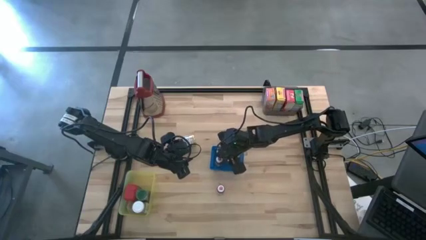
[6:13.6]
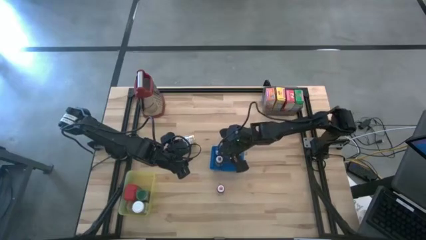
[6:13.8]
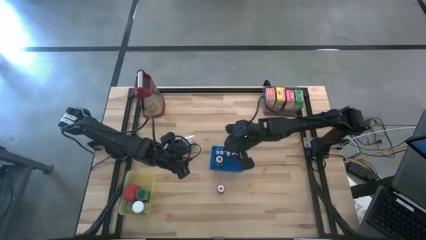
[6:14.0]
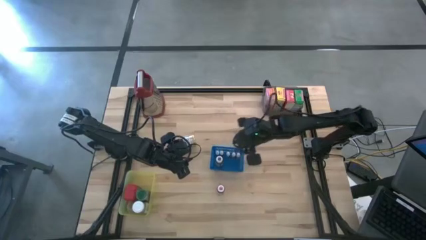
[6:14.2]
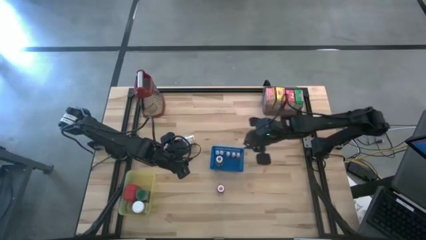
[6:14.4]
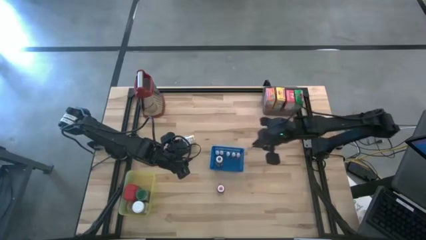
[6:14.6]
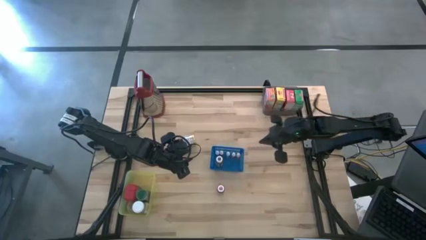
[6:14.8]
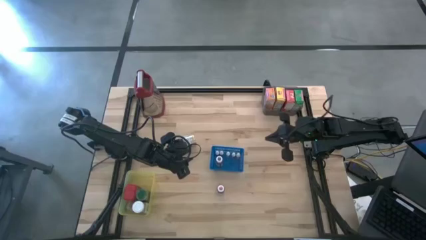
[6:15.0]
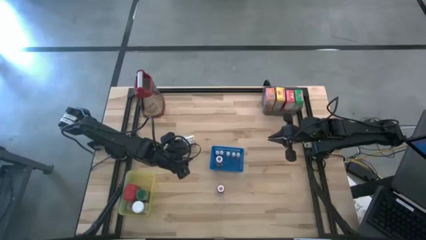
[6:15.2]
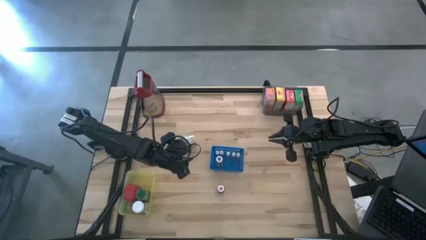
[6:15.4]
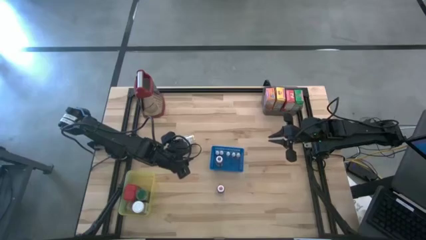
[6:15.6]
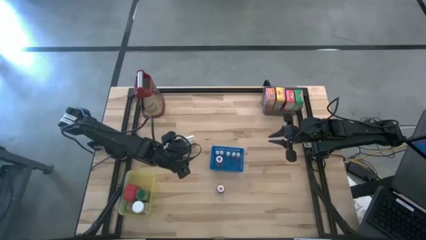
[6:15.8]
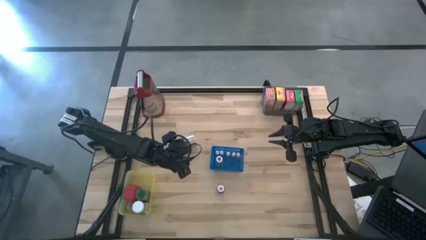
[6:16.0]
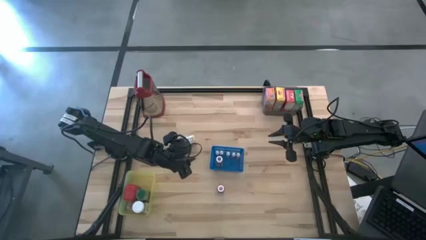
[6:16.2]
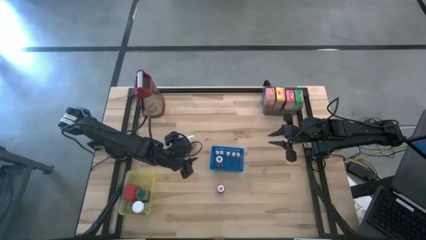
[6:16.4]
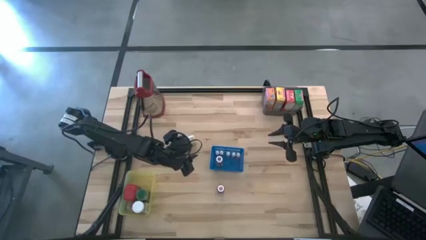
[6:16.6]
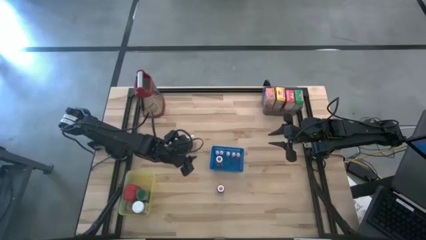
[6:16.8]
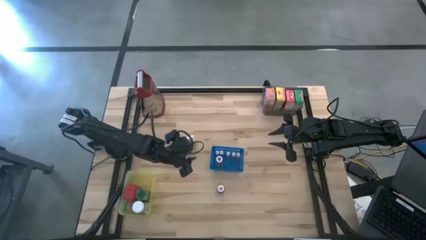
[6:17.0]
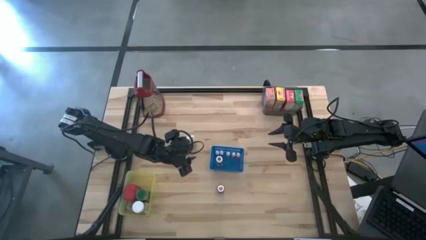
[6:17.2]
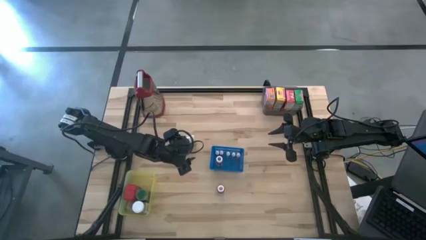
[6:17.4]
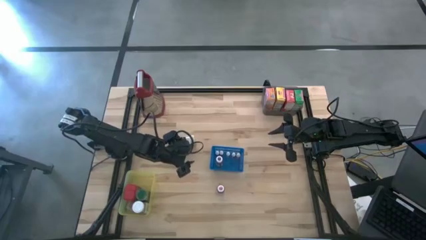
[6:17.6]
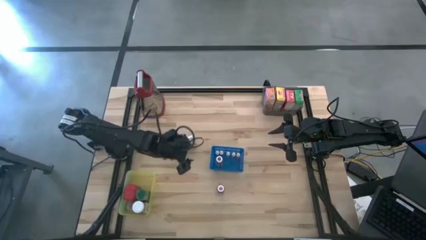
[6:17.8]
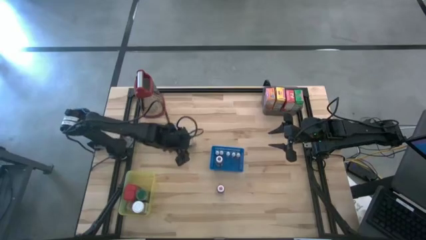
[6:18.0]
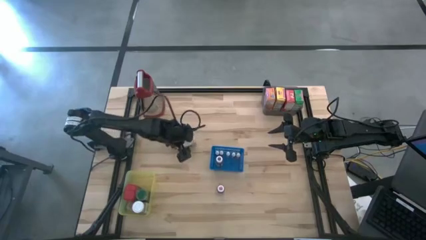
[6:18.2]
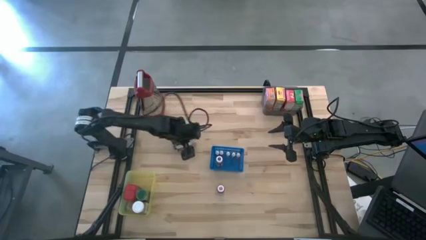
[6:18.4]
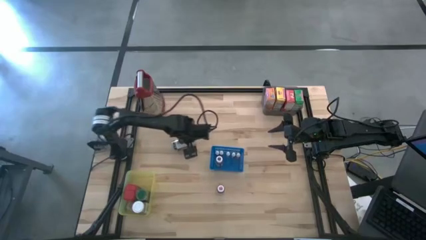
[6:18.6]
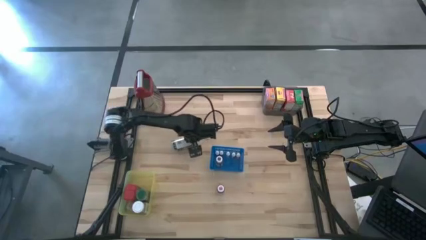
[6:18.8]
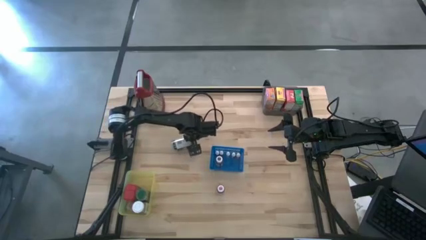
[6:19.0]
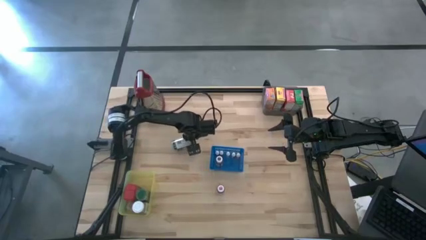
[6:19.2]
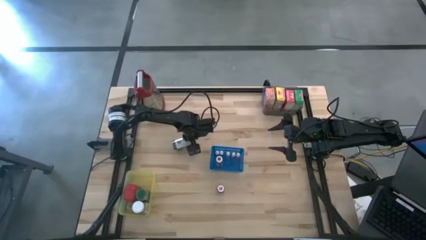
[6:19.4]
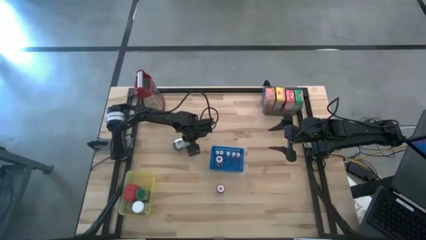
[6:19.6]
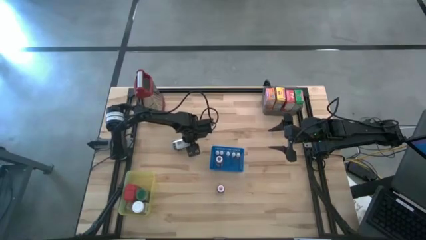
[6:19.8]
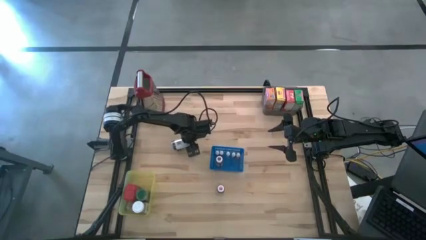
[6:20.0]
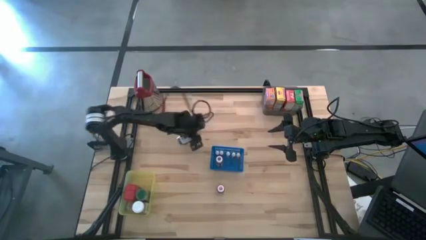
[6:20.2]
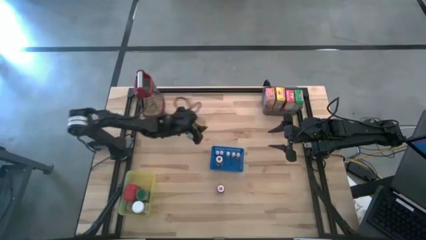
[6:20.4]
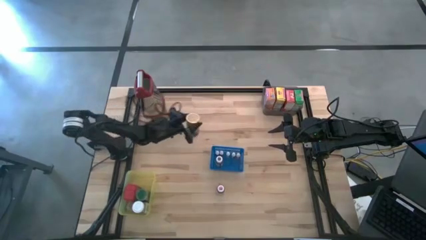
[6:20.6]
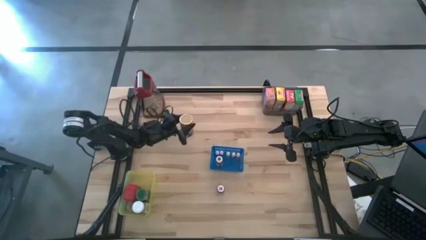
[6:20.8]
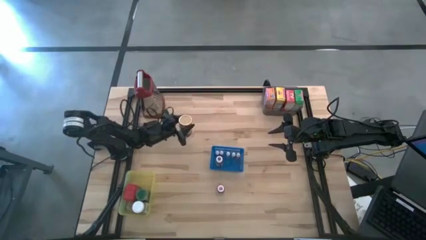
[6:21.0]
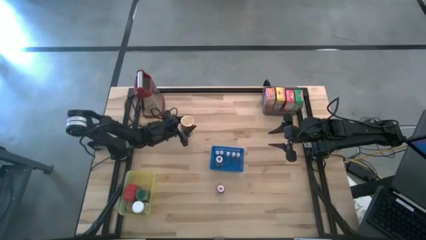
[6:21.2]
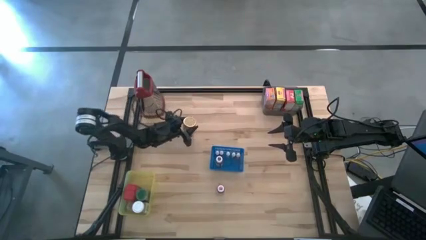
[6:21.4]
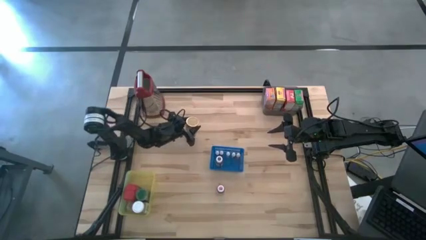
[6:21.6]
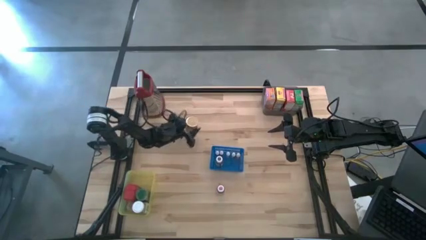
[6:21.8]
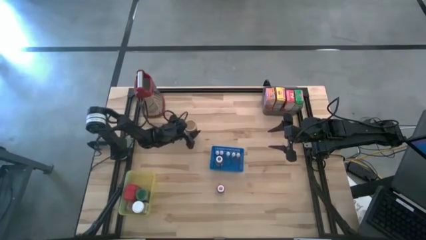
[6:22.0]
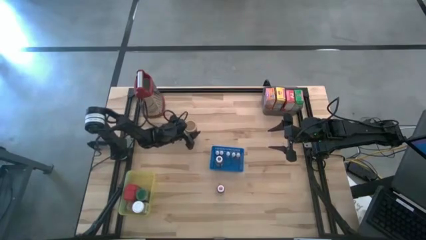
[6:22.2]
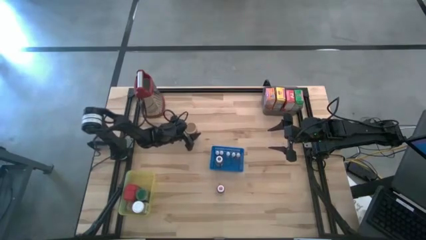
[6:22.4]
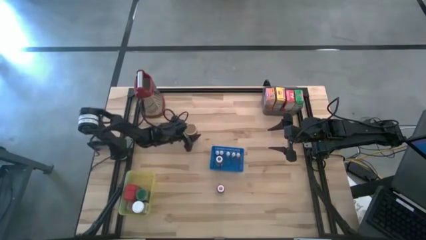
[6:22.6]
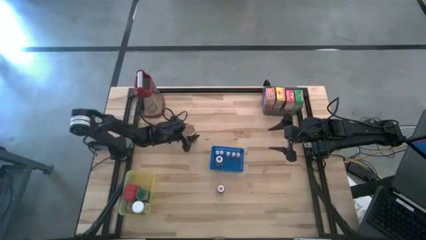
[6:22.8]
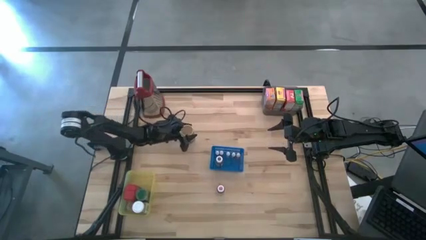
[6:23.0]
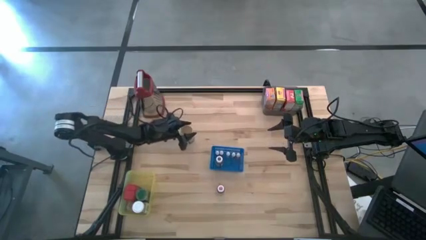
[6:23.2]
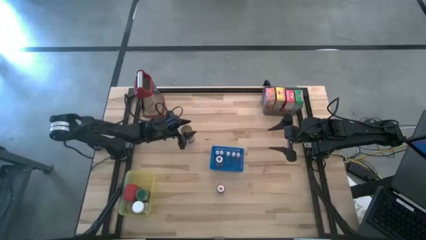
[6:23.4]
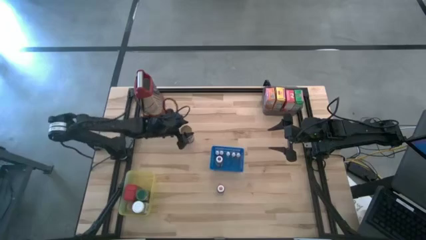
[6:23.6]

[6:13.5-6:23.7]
Task: Pick & Place Kitchen Items
Put the golden seasoning bottle into the yellow bin
